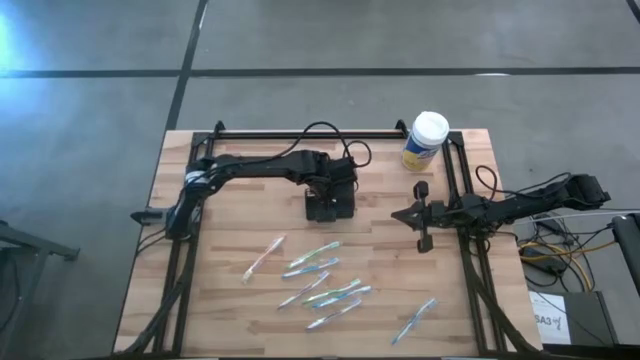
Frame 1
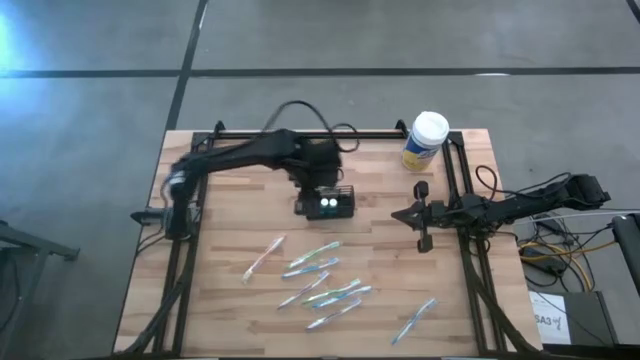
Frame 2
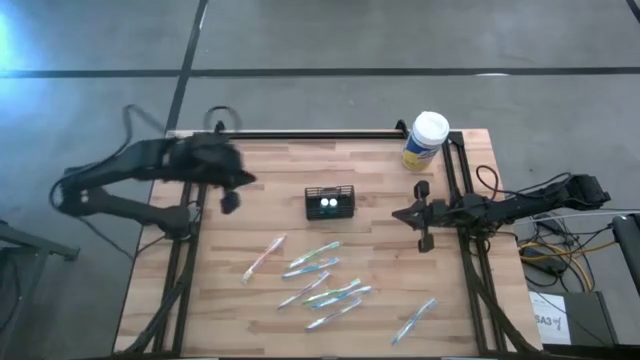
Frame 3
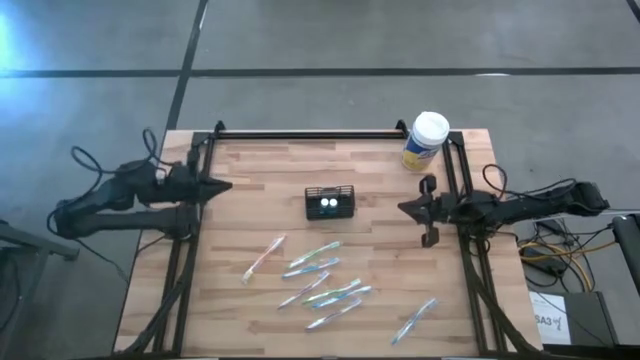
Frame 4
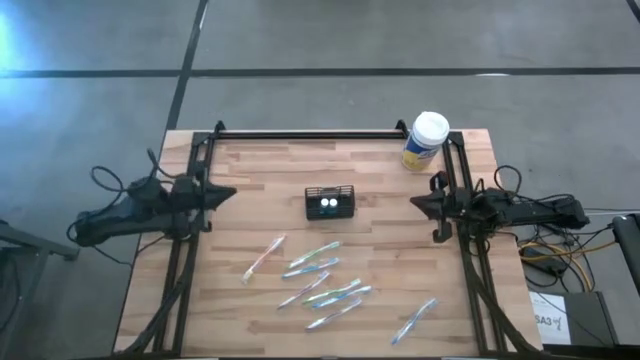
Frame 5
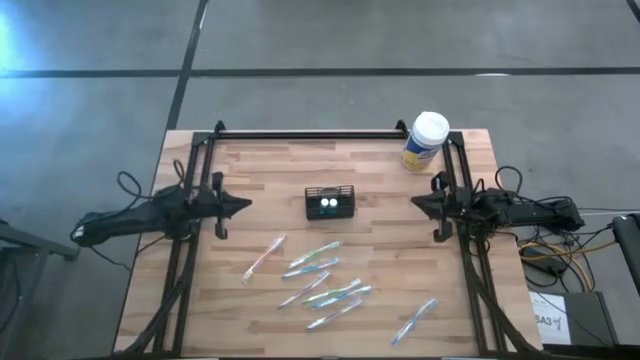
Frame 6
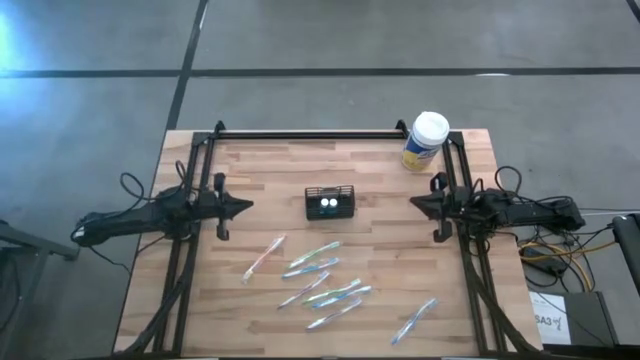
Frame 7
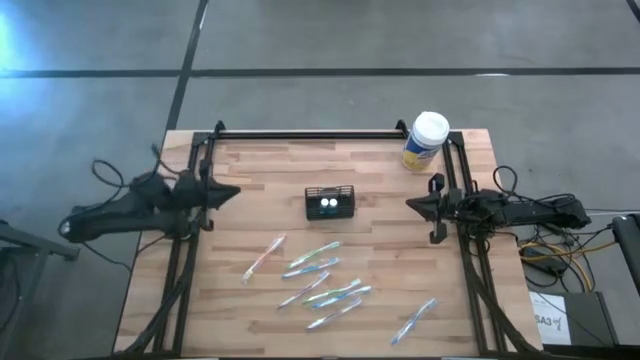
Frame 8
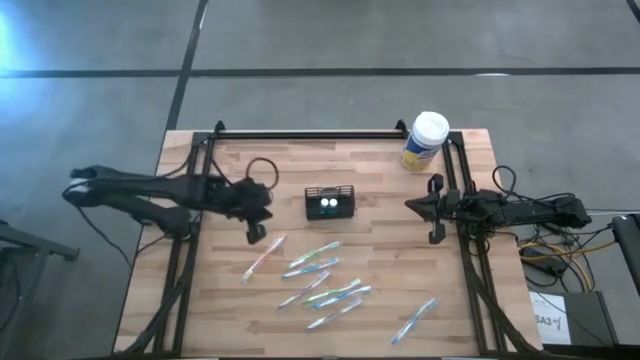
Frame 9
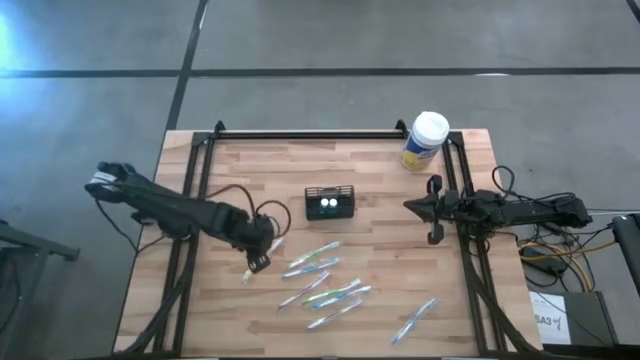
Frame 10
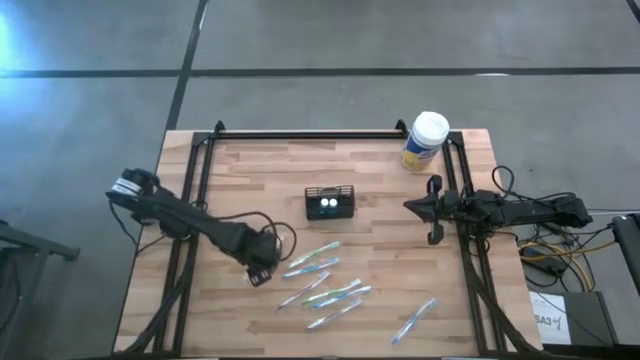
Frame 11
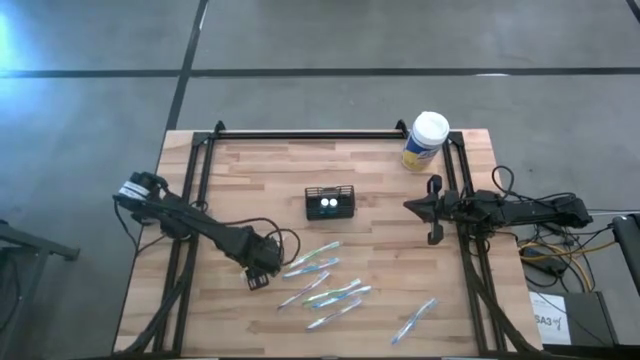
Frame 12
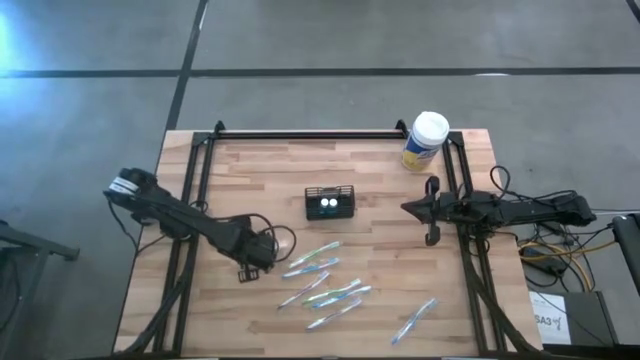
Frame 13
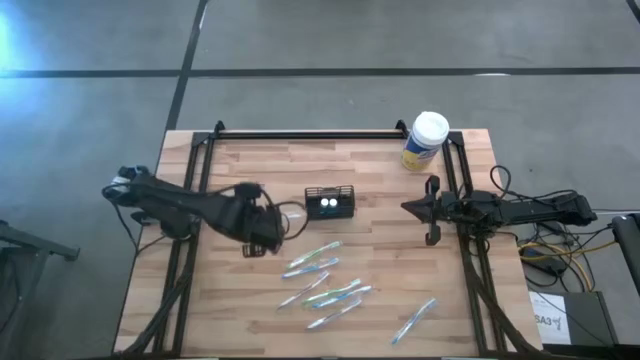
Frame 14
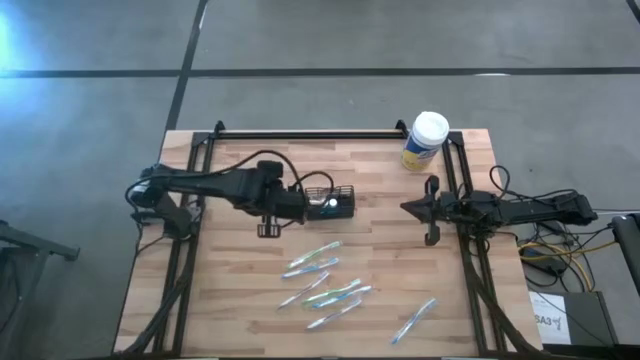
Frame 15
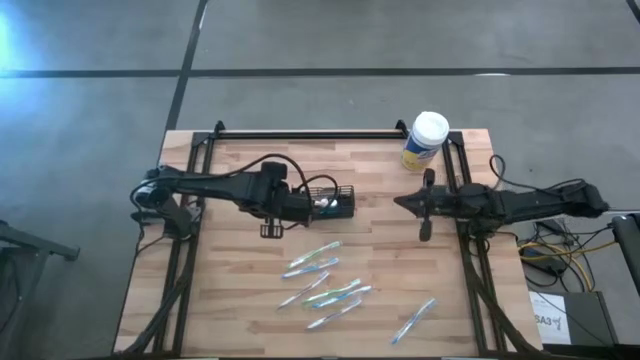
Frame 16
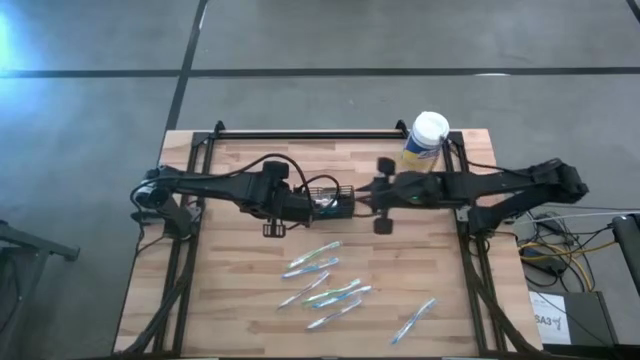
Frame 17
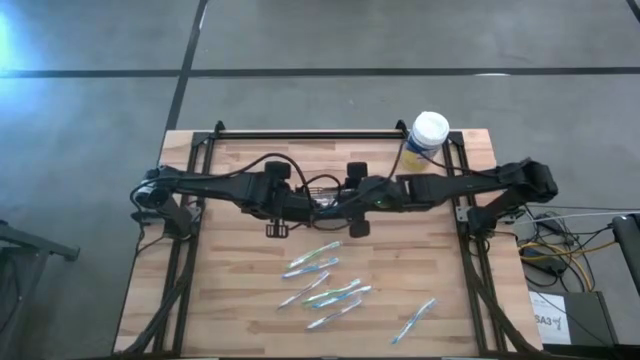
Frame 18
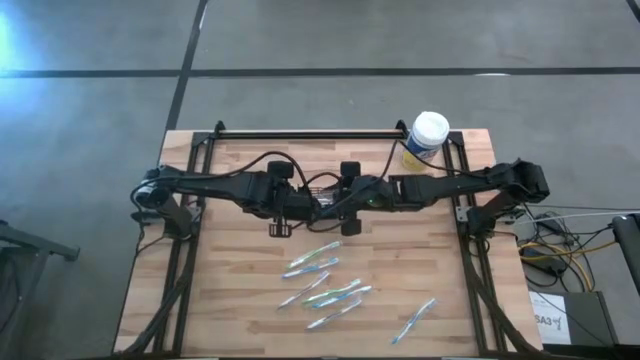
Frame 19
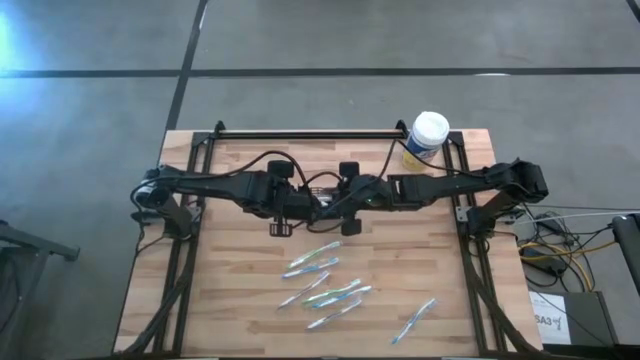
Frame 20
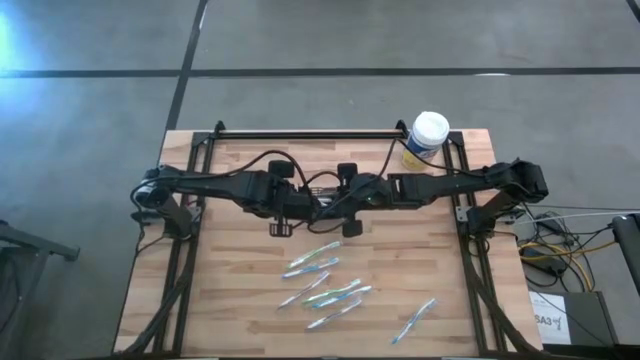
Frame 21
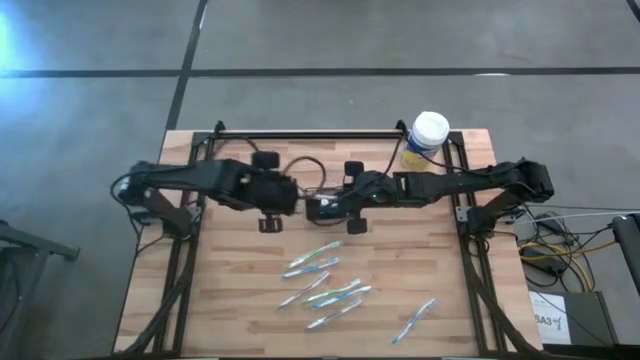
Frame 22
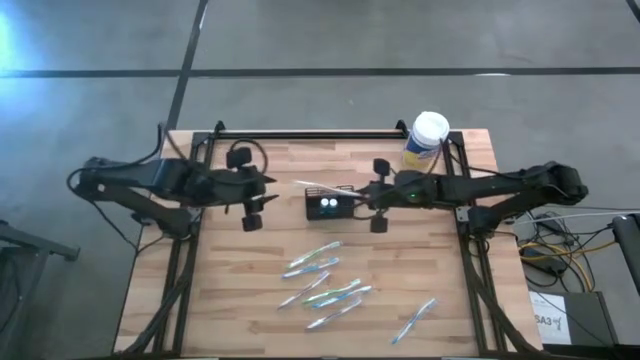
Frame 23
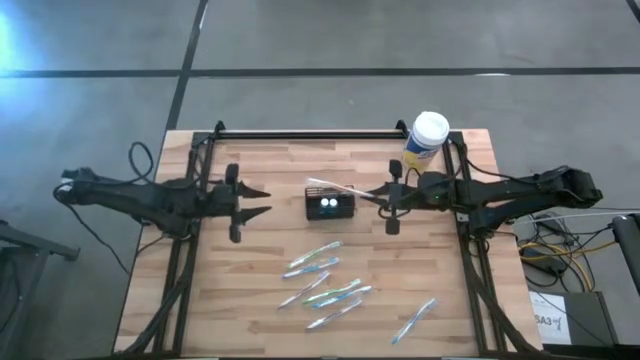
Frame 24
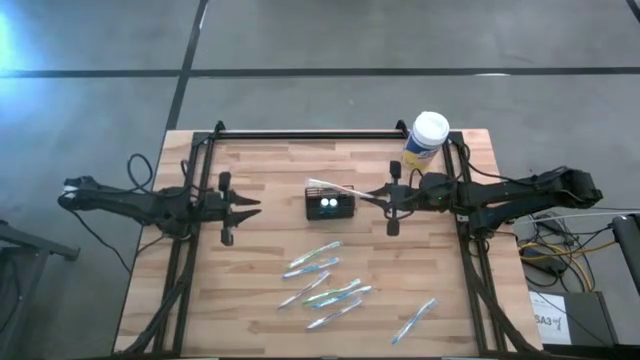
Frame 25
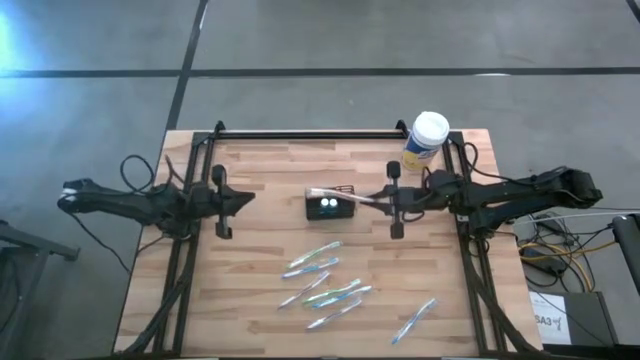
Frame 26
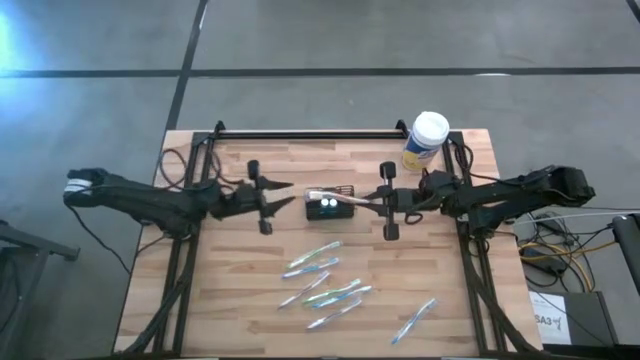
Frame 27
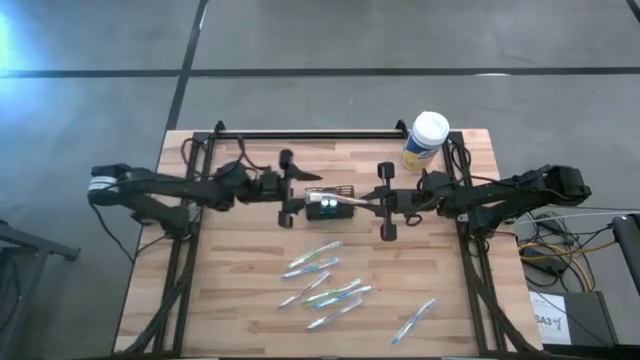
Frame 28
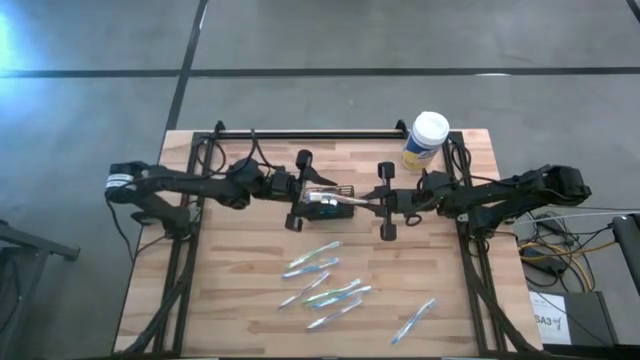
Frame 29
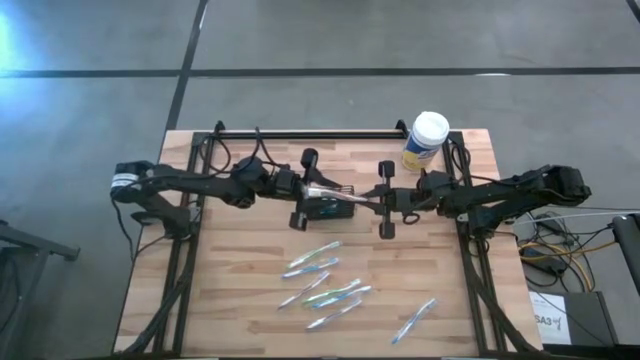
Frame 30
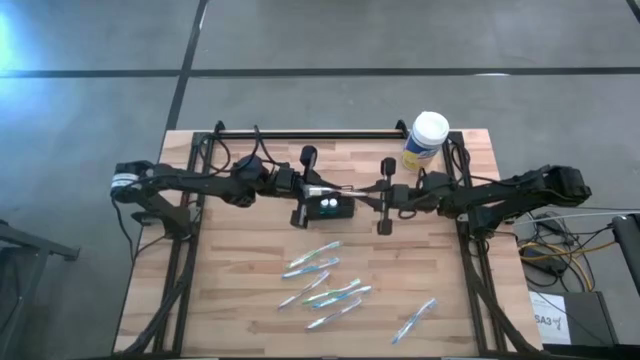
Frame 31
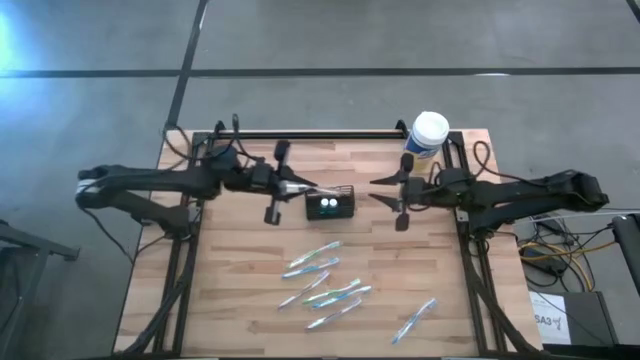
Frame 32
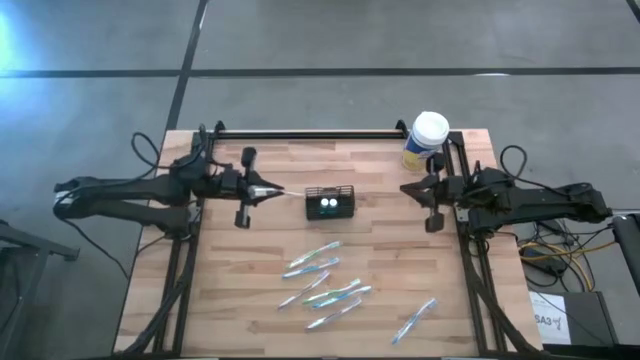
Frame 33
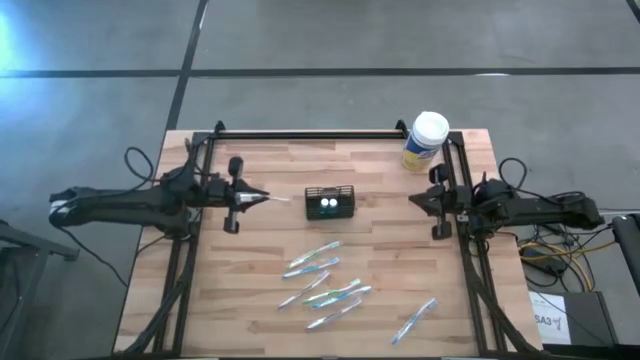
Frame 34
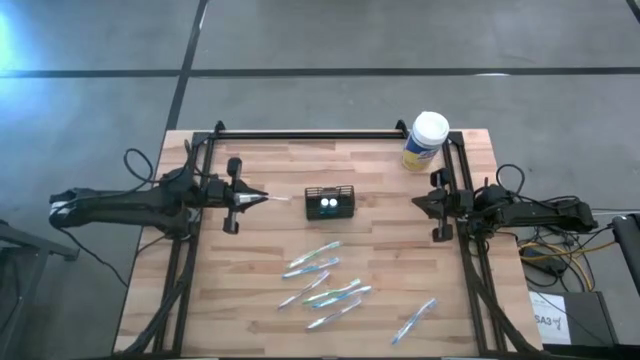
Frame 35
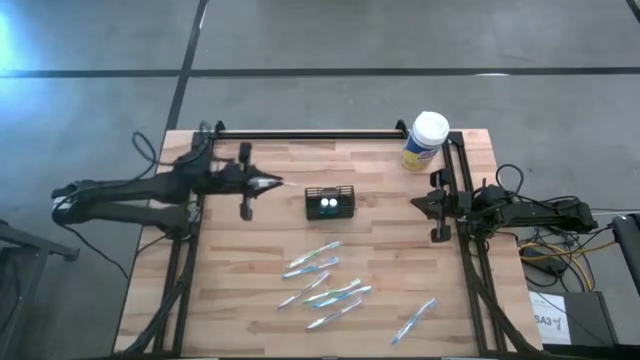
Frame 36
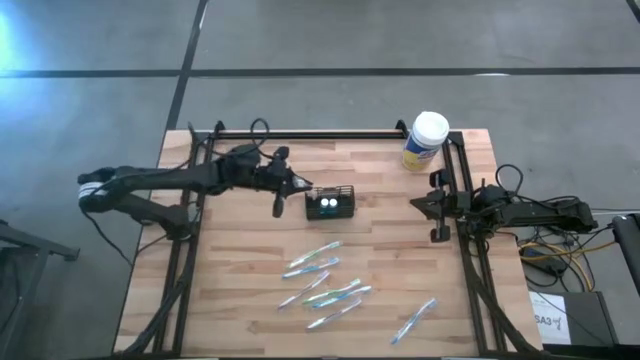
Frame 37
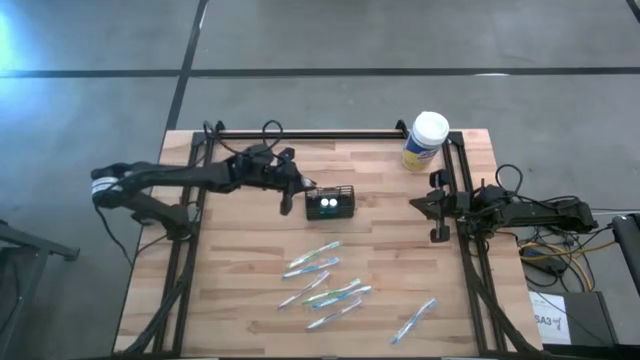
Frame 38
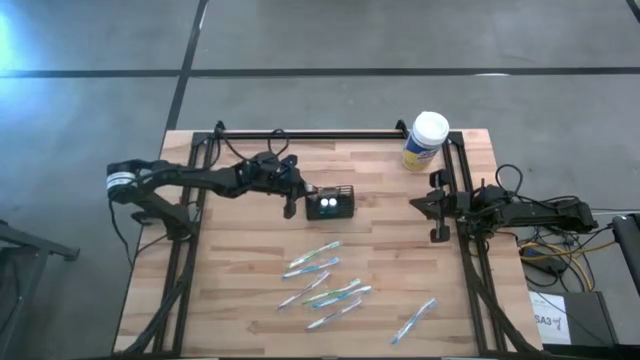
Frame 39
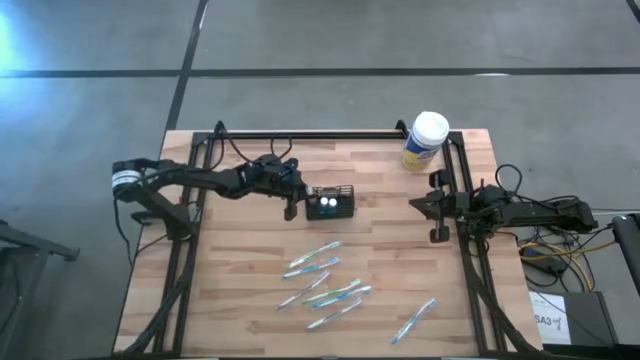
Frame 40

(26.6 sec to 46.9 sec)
Task: Pick & Place toothbrushing station
Put the orange toothbrush in the wire organizer

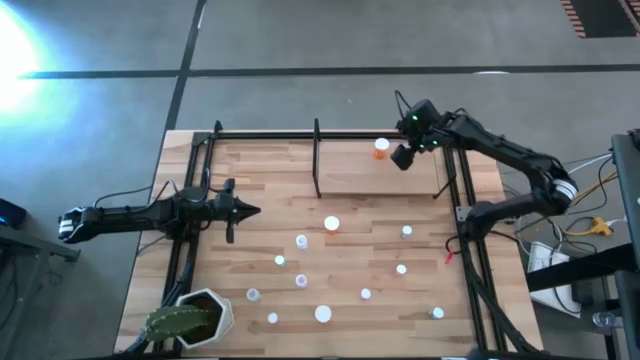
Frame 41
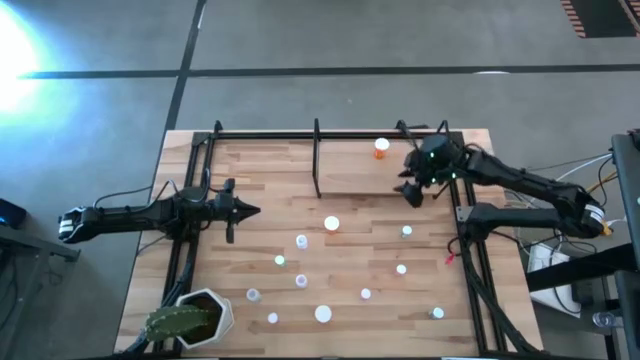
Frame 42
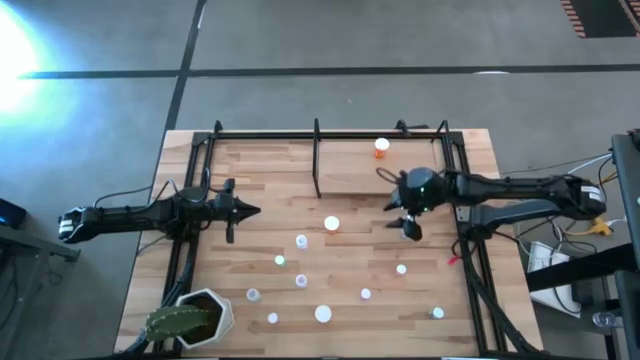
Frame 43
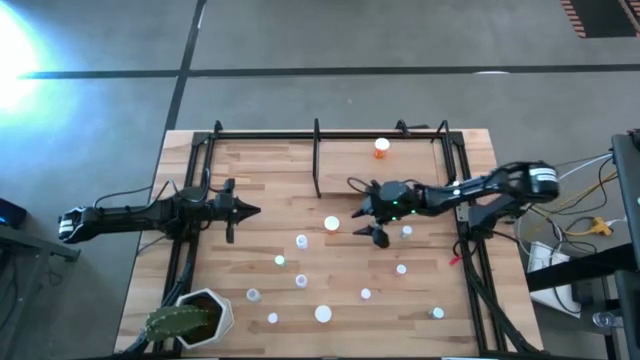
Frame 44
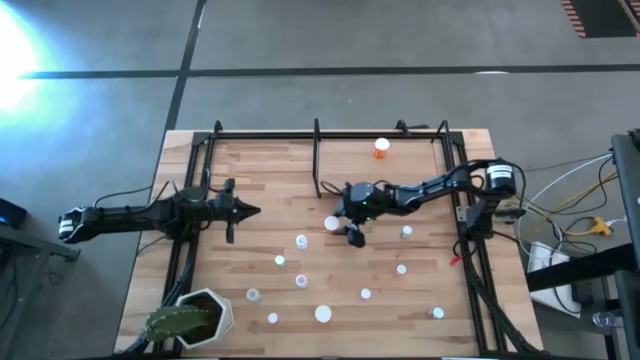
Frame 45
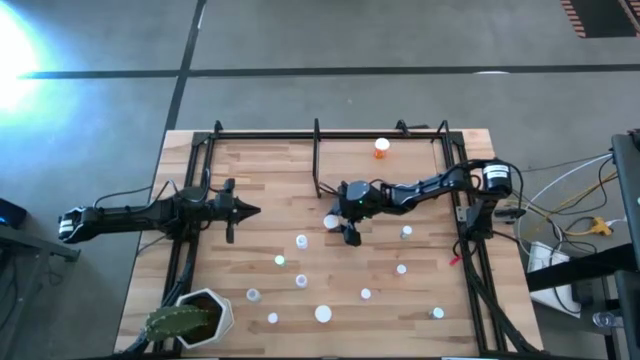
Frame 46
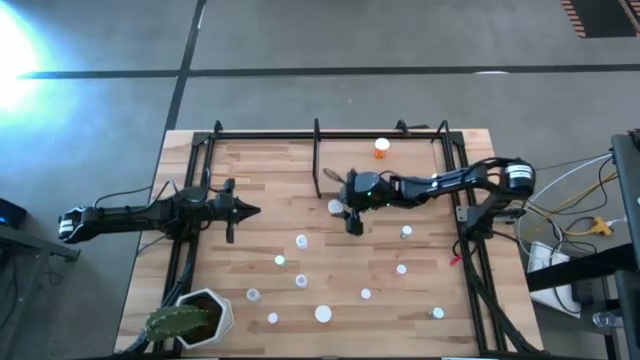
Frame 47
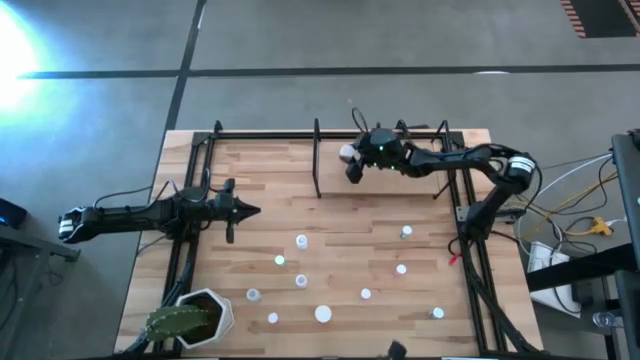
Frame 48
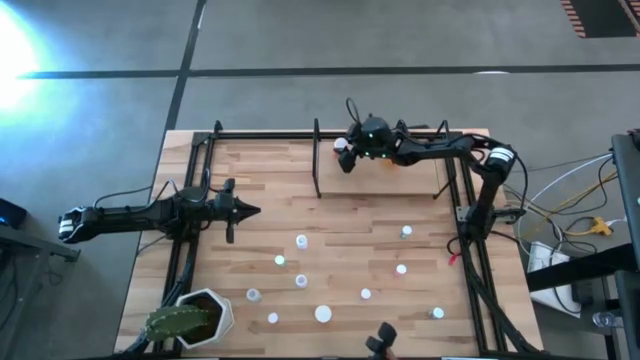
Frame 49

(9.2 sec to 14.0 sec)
Task: Pick and place medicine bottles onto shelf by color
Put the top orange pill bottle on the shelf
